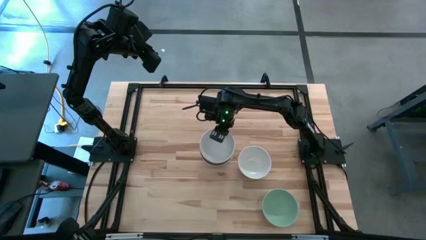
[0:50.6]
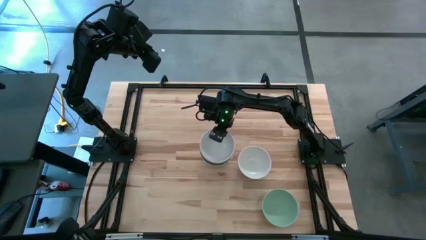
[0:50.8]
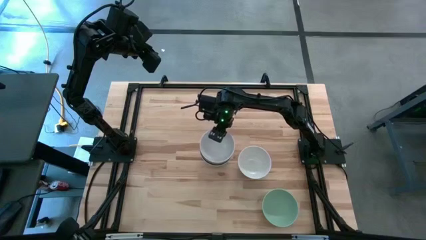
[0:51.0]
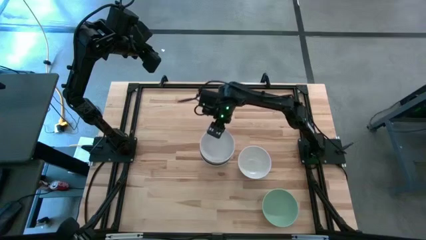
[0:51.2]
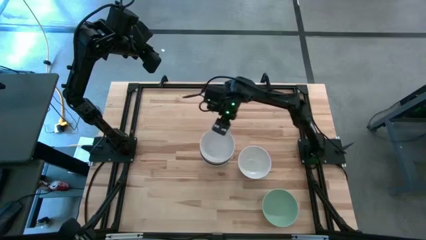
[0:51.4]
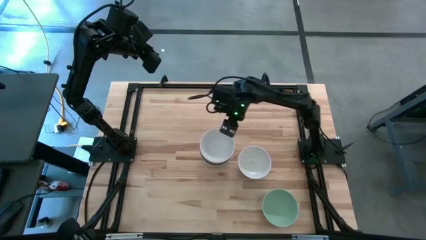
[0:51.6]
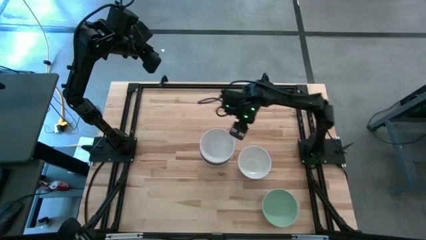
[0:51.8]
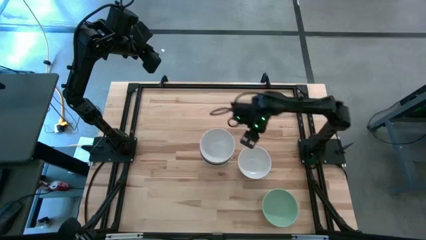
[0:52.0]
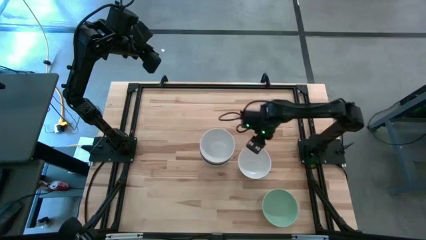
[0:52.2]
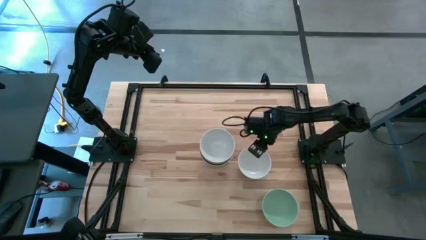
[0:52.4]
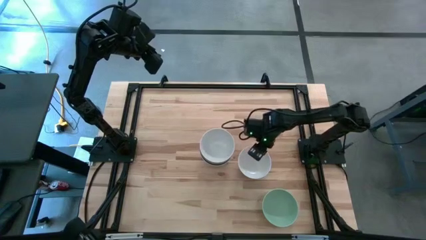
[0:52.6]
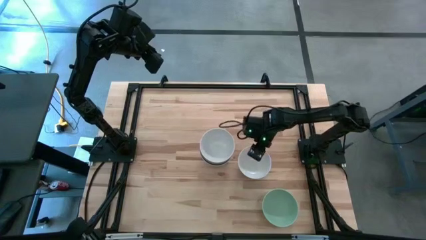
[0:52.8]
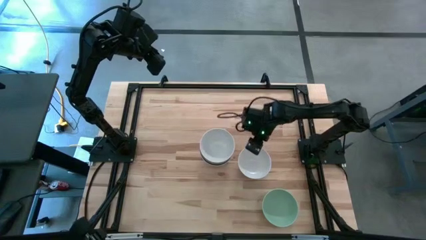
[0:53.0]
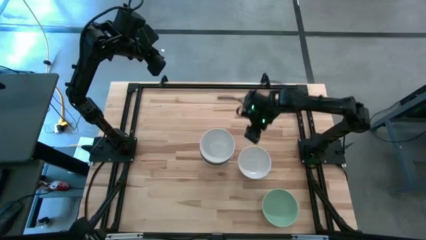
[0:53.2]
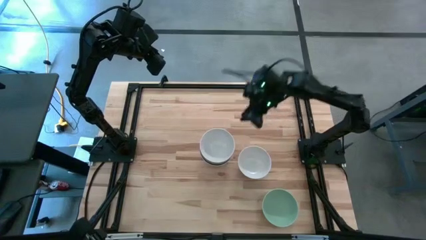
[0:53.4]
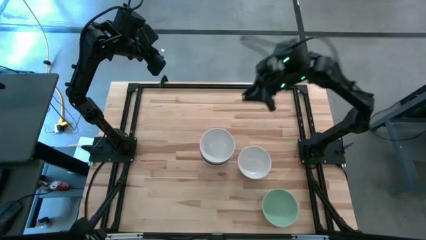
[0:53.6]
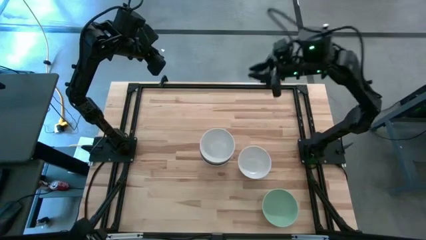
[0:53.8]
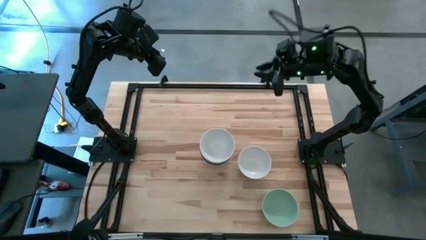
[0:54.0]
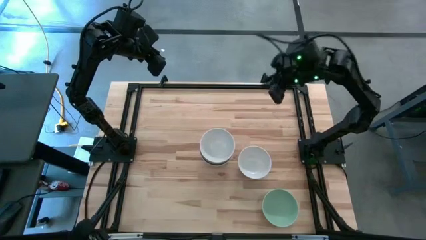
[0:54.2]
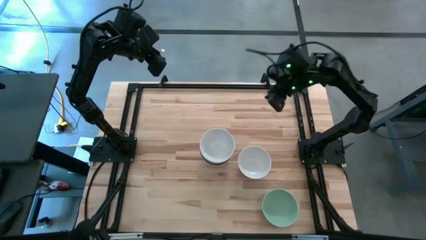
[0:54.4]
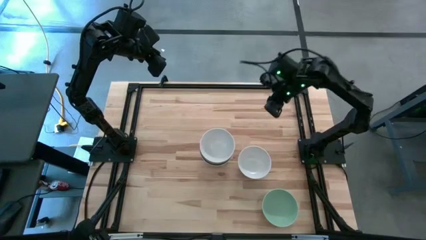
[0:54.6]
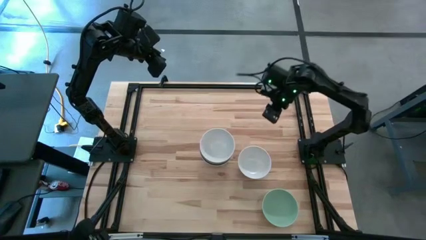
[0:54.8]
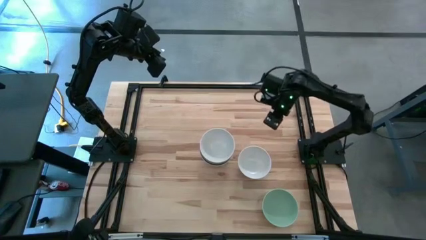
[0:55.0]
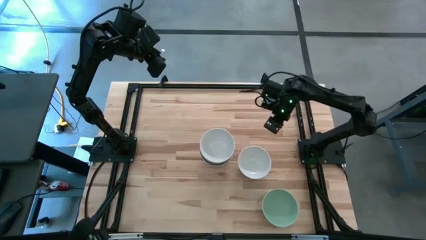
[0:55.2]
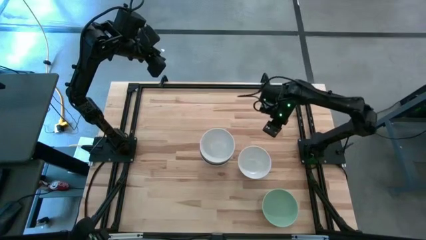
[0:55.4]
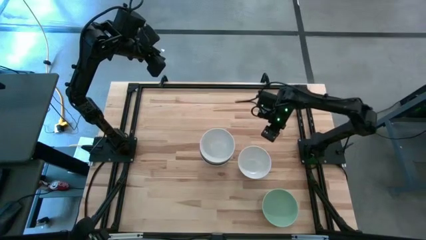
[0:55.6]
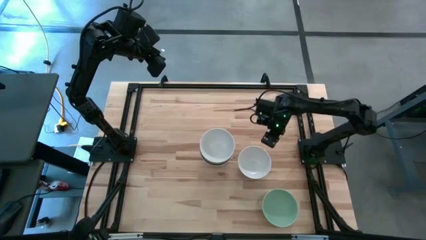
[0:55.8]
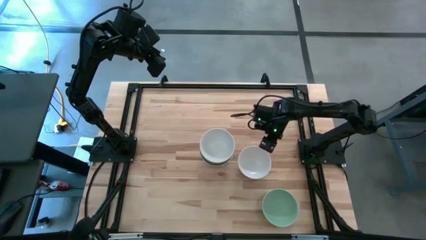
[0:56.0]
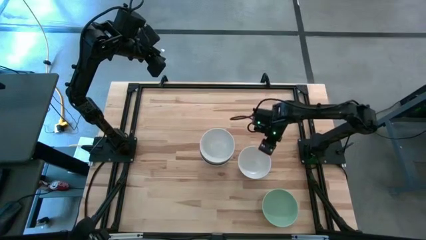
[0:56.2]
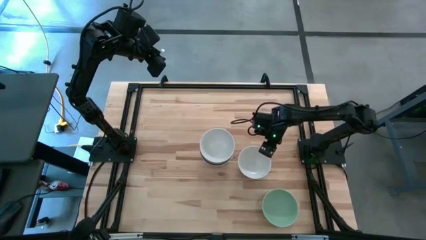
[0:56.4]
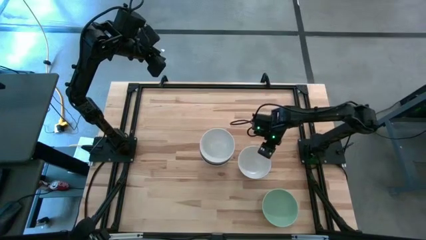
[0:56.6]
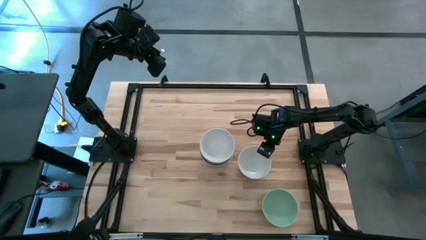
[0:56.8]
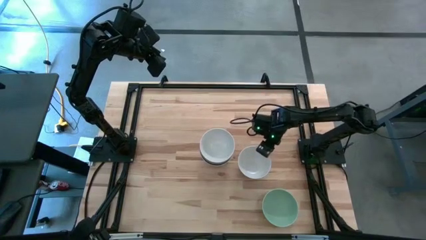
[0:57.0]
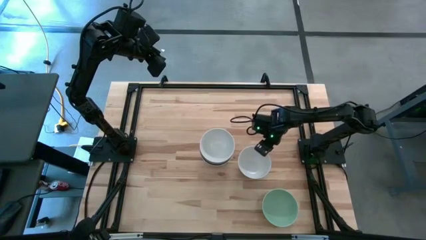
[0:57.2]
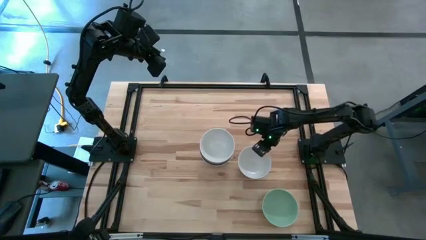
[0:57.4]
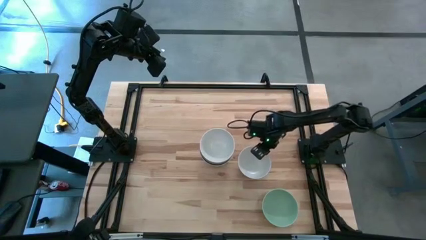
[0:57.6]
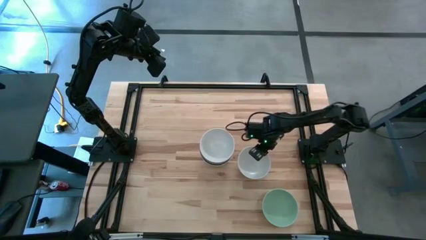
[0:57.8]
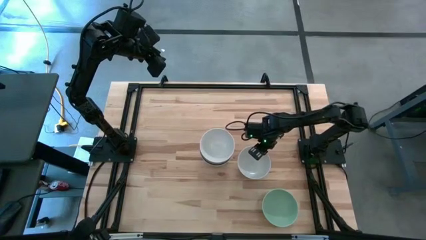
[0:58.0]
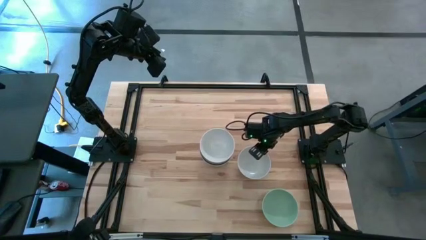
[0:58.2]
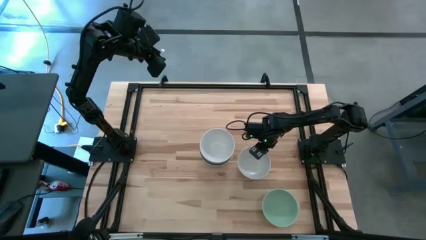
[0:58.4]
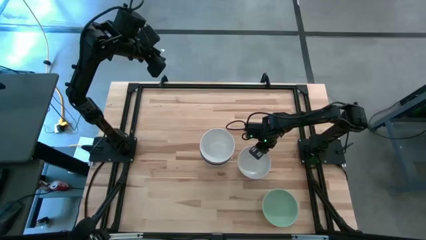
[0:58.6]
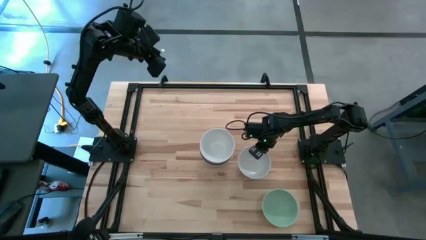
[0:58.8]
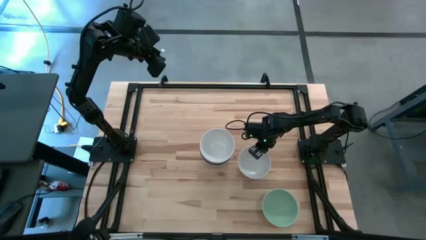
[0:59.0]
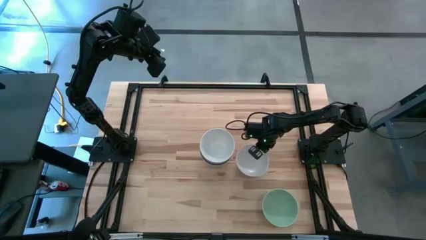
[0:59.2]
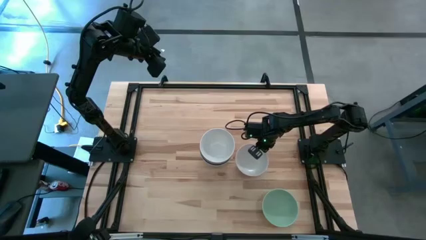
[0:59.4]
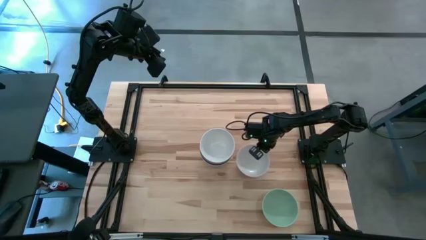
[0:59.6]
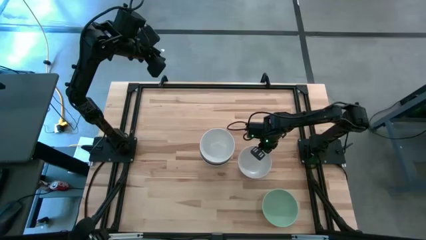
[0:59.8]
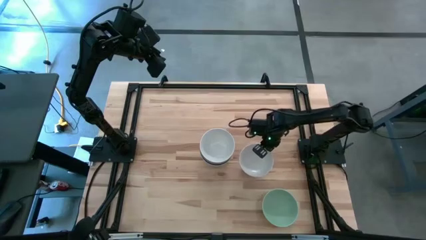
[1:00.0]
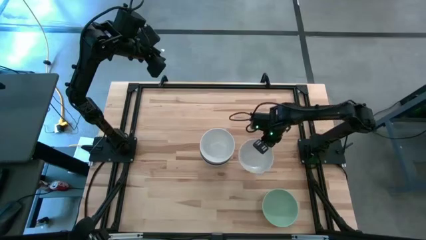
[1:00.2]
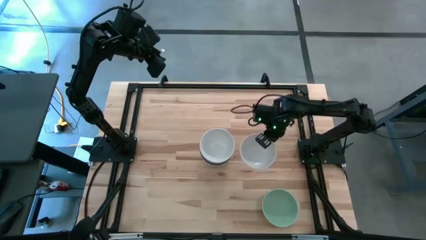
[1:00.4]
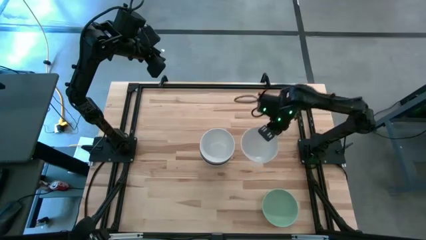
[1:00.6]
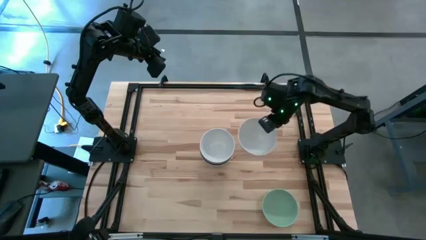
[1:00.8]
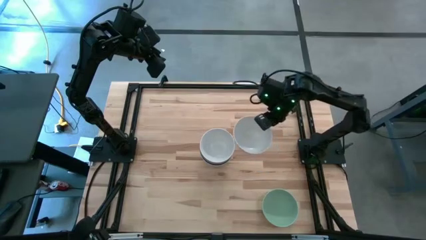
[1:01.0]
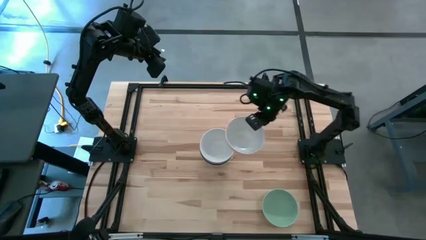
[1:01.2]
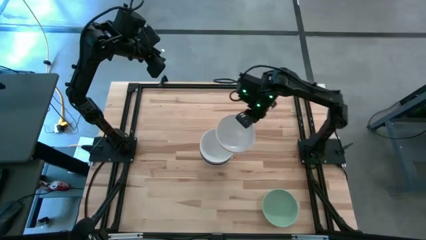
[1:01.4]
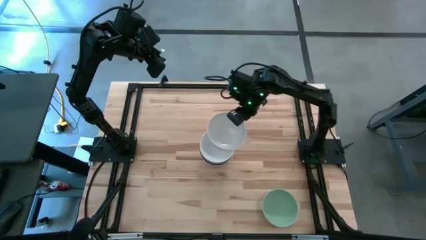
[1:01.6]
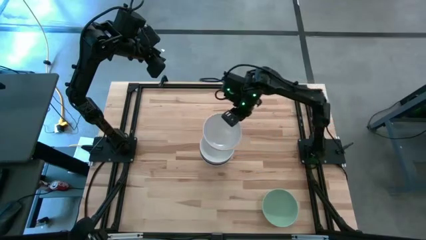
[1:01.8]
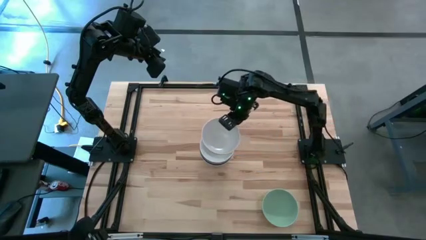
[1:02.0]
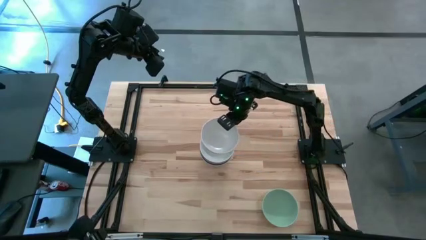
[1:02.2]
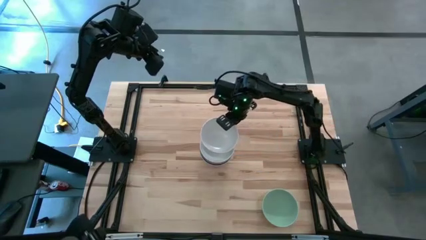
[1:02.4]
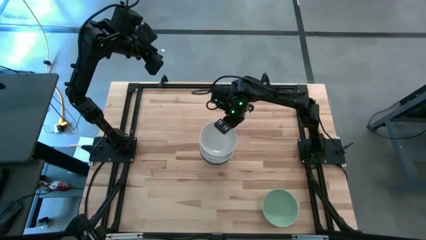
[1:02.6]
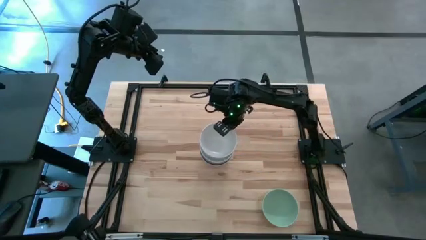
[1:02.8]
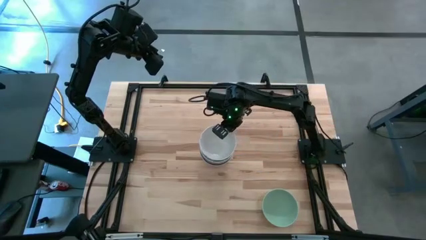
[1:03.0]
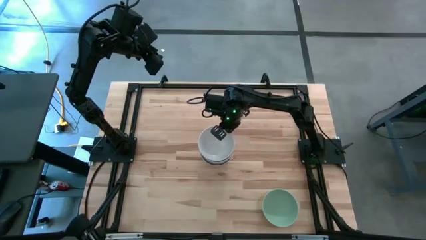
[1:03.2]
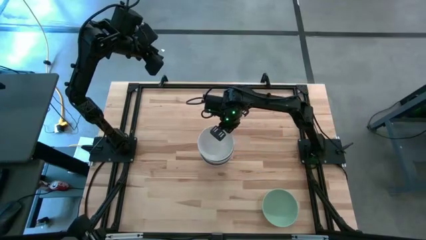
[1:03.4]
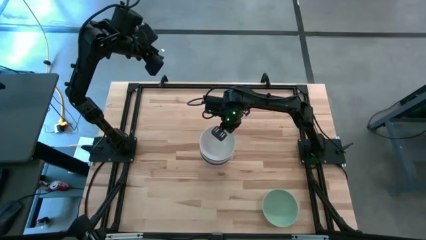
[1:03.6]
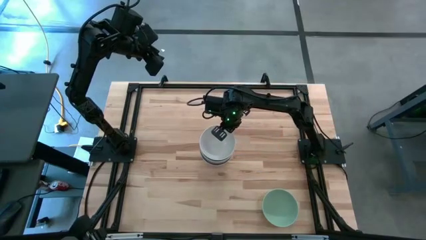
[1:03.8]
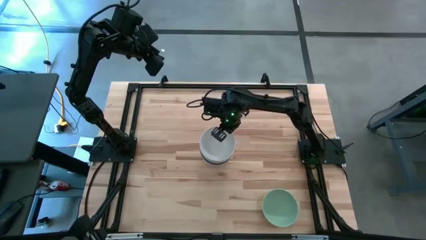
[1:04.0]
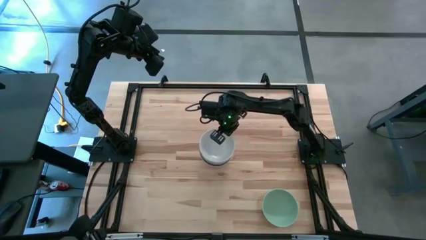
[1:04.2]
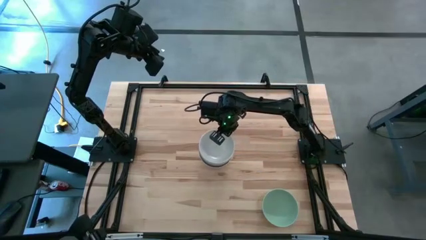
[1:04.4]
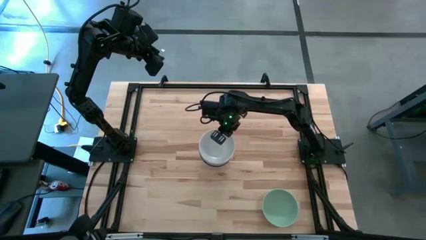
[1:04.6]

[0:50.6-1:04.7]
Task: Nest bowls inside each other
Stack the white bowl on the other white bowl

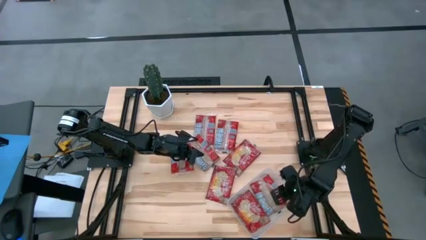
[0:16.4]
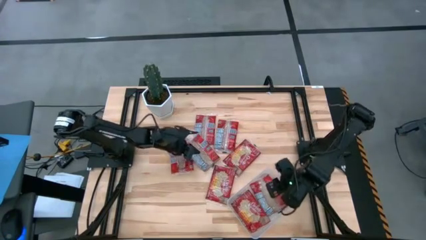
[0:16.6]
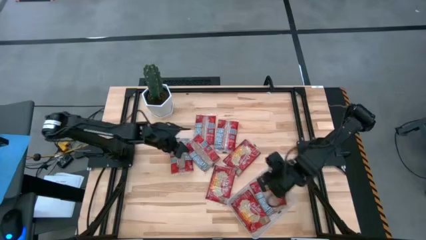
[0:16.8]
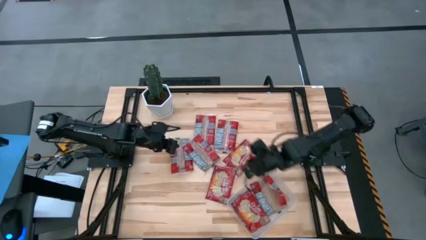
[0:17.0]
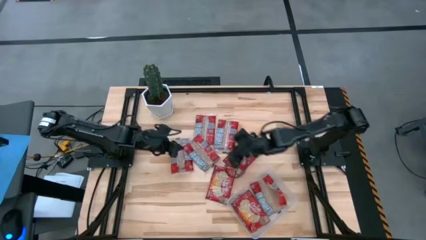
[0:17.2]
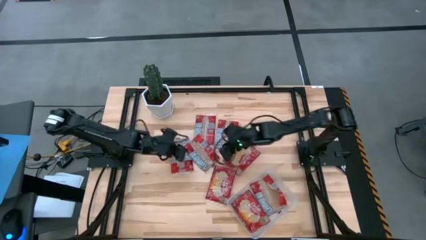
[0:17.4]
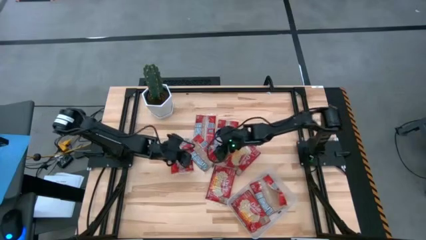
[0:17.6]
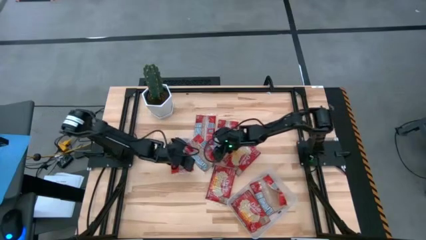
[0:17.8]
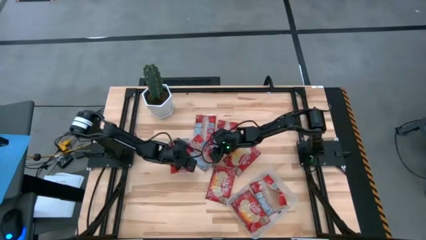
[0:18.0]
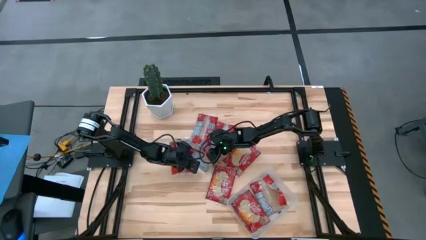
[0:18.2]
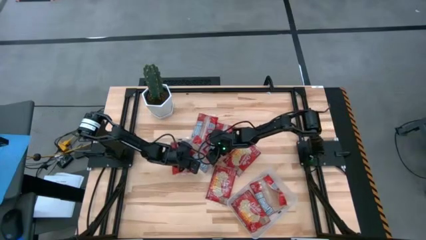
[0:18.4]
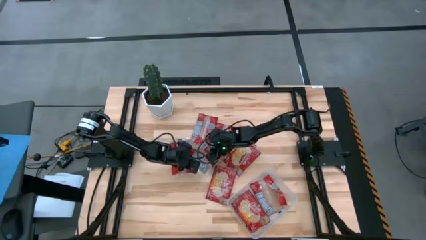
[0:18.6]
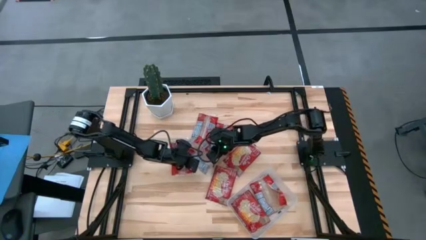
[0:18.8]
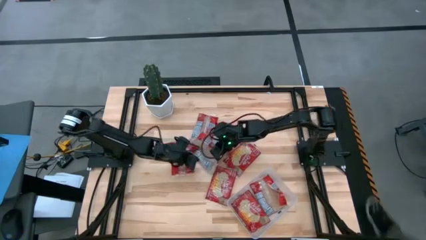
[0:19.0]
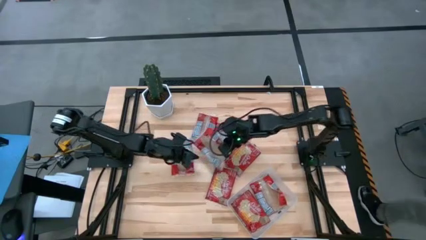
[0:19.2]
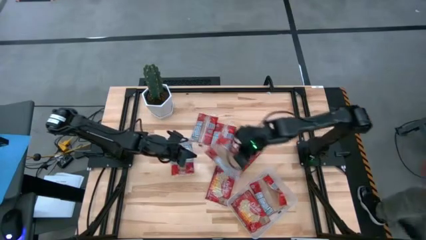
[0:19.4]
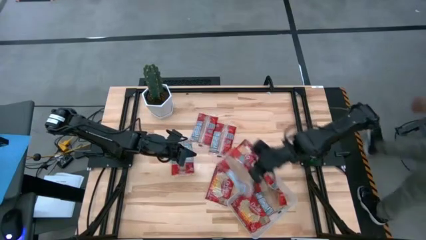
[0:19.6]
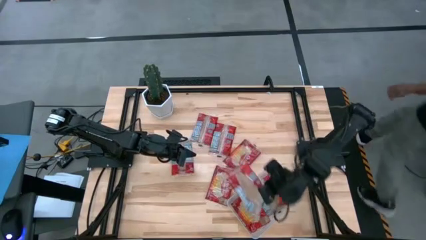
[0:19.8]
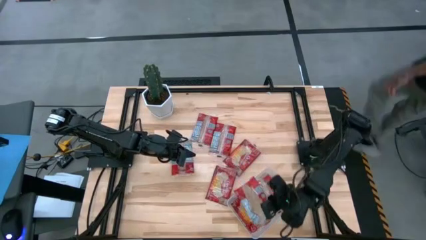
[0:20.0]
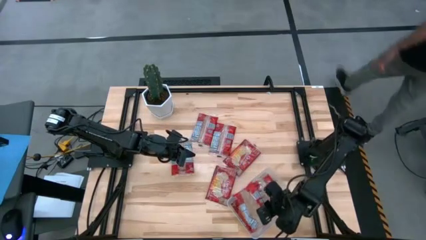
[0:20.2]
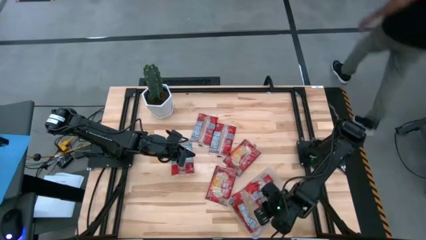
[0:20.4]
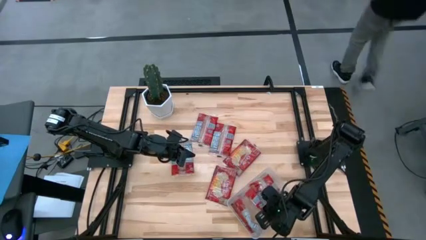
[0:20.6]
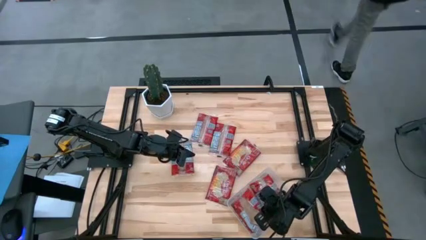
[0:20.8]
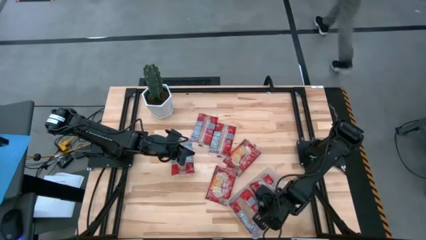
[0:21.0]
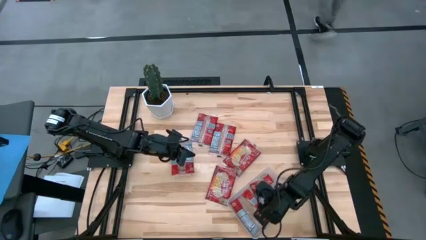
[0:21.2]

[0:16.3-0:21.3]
Task: Sort popcorn bags into baskets
Put the red popcorn bag into the transparent container
